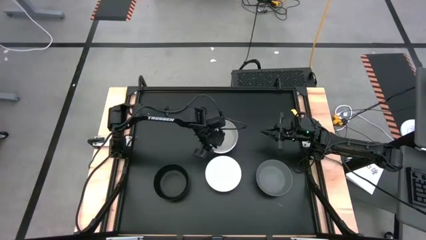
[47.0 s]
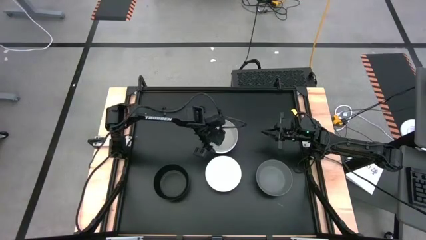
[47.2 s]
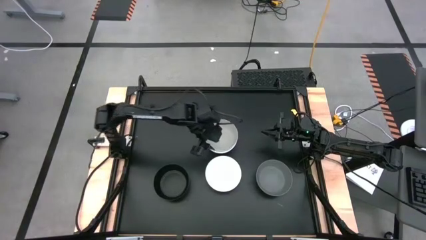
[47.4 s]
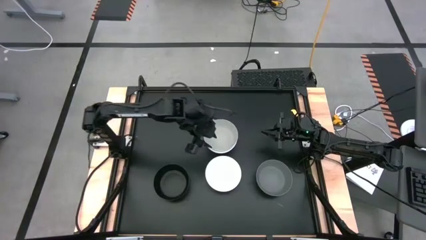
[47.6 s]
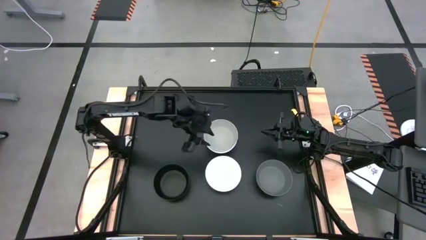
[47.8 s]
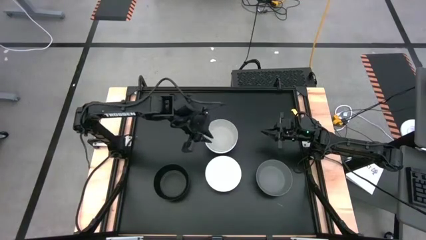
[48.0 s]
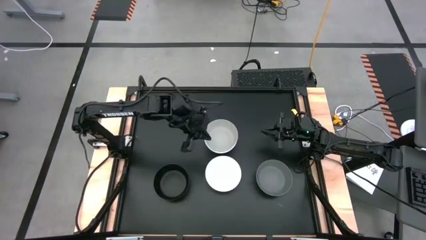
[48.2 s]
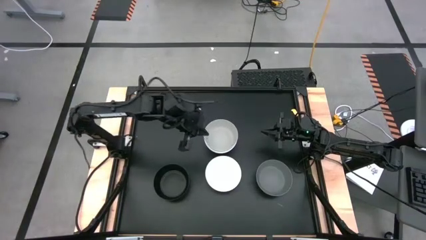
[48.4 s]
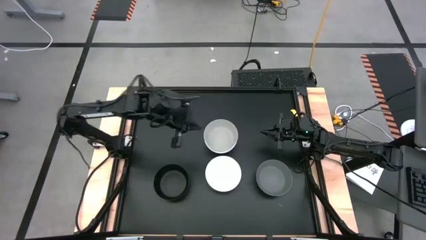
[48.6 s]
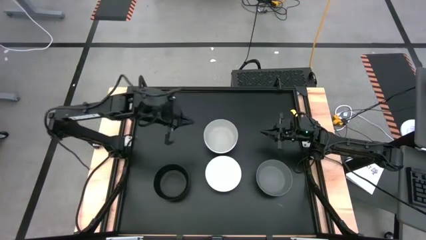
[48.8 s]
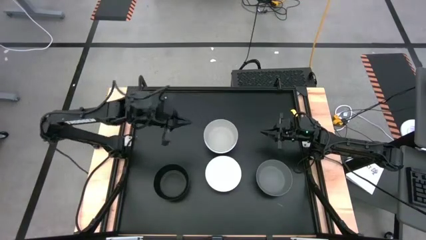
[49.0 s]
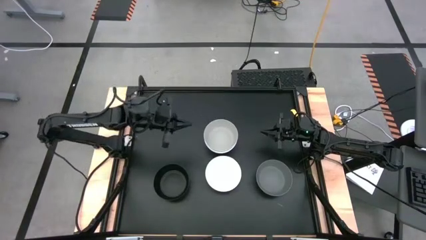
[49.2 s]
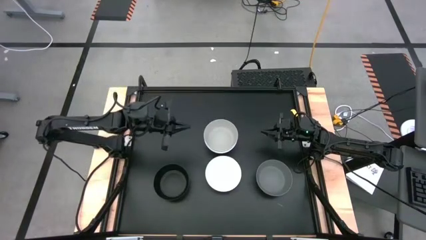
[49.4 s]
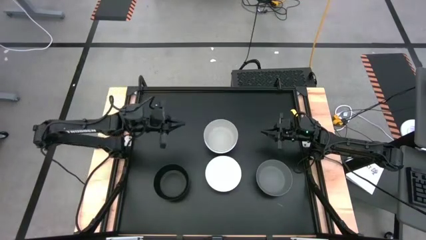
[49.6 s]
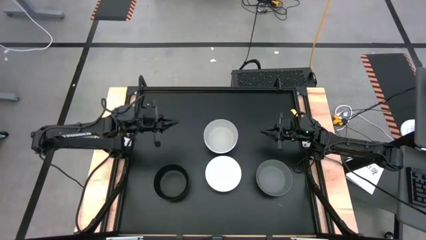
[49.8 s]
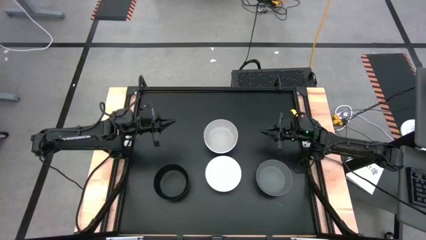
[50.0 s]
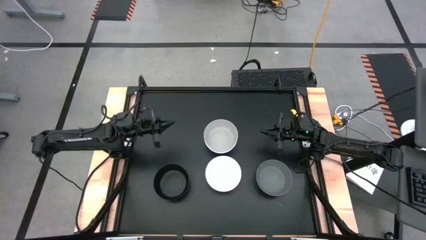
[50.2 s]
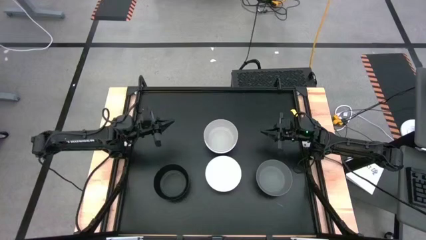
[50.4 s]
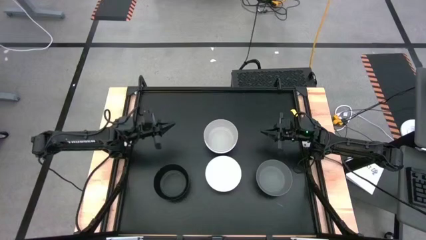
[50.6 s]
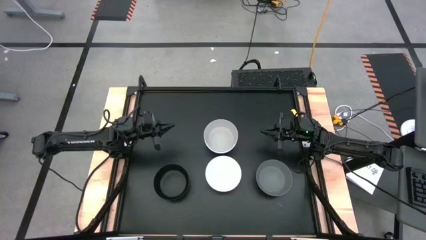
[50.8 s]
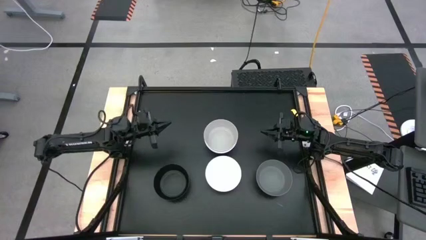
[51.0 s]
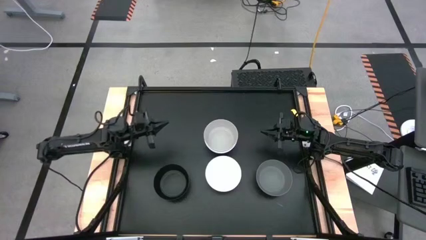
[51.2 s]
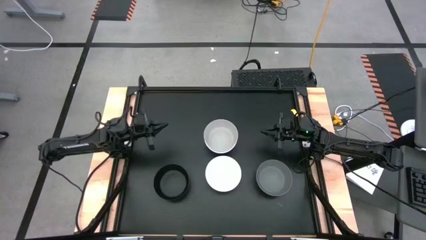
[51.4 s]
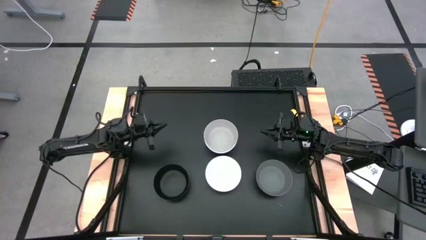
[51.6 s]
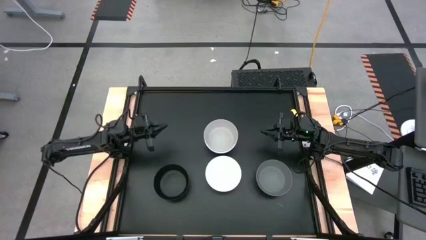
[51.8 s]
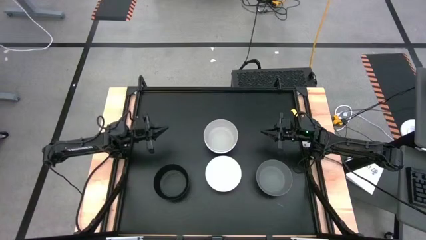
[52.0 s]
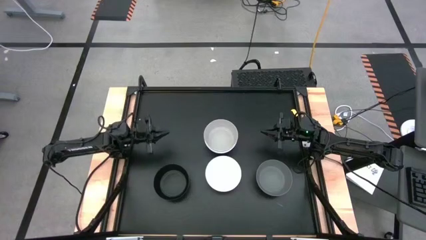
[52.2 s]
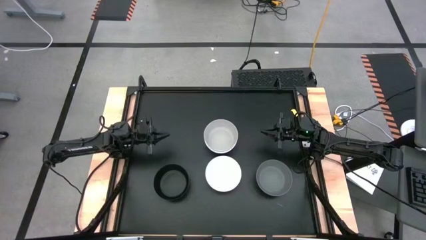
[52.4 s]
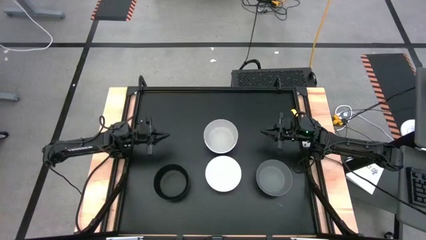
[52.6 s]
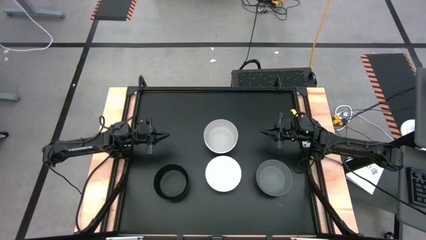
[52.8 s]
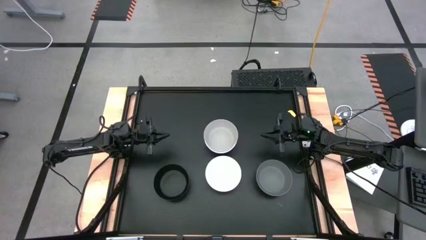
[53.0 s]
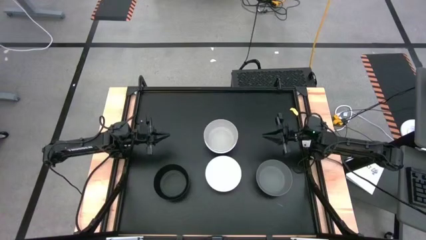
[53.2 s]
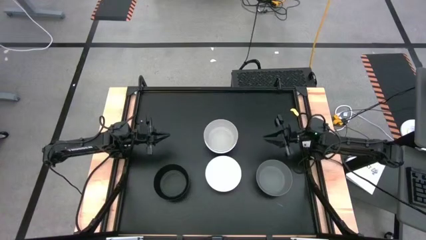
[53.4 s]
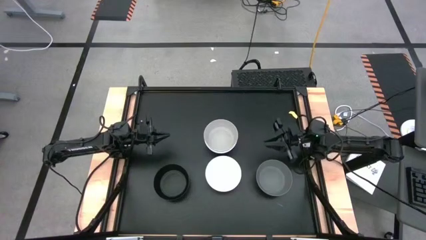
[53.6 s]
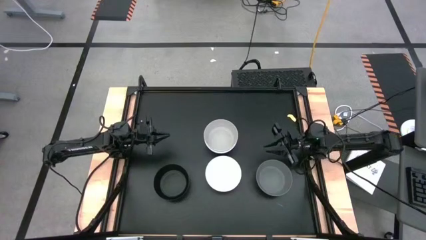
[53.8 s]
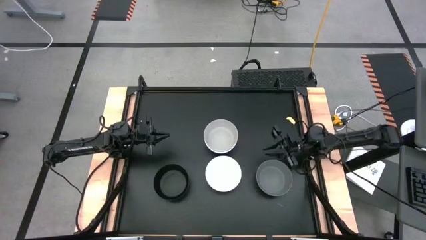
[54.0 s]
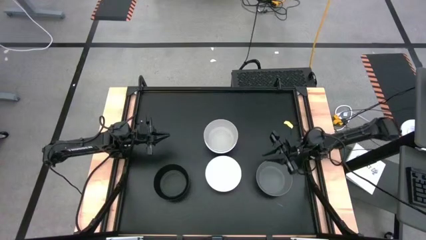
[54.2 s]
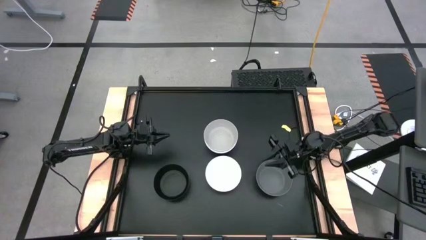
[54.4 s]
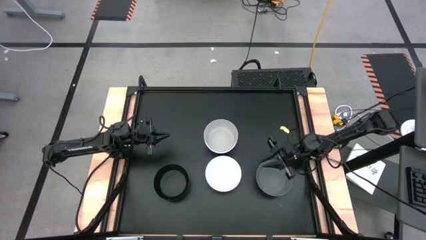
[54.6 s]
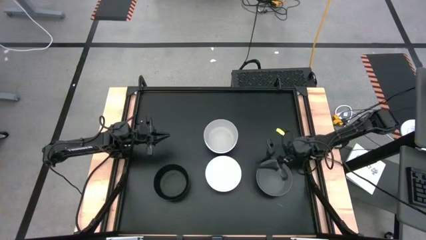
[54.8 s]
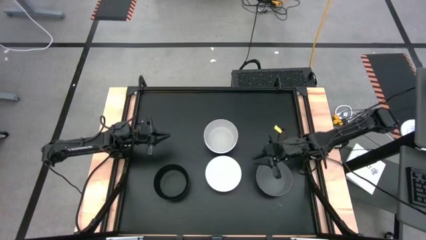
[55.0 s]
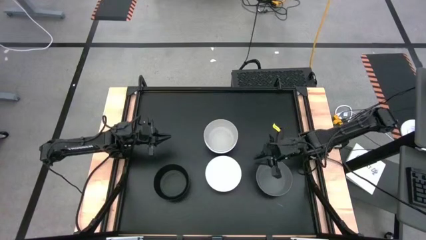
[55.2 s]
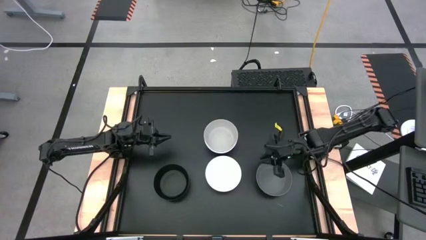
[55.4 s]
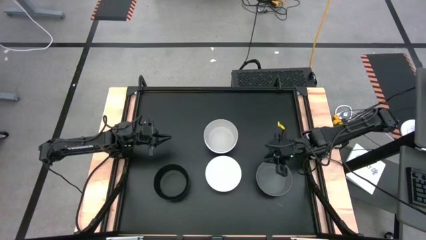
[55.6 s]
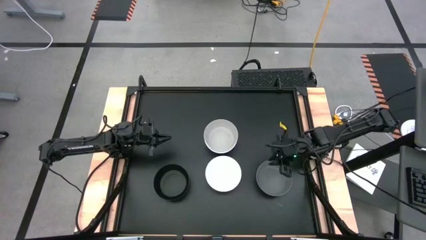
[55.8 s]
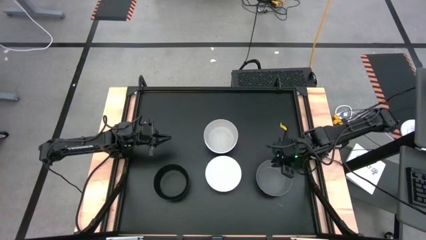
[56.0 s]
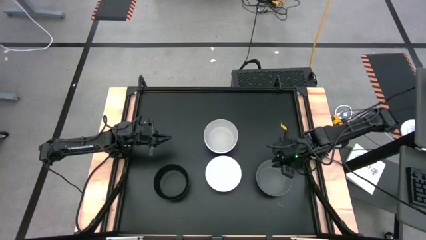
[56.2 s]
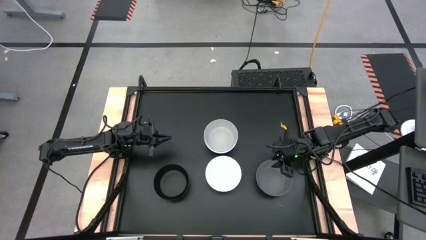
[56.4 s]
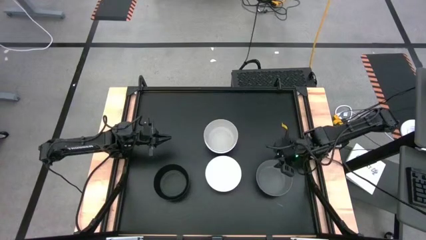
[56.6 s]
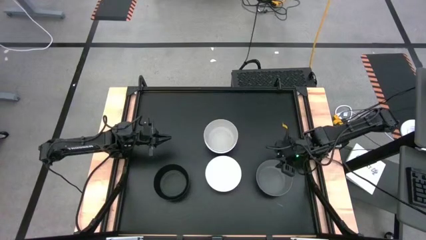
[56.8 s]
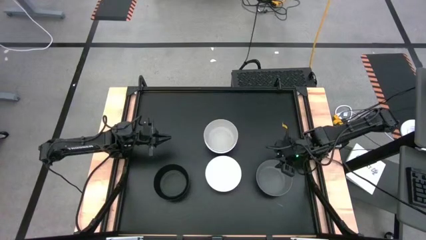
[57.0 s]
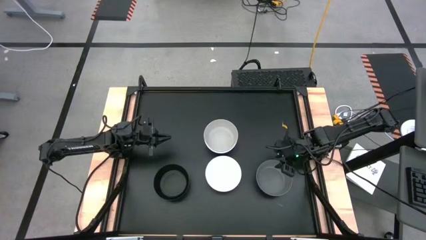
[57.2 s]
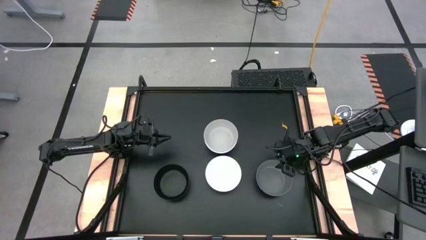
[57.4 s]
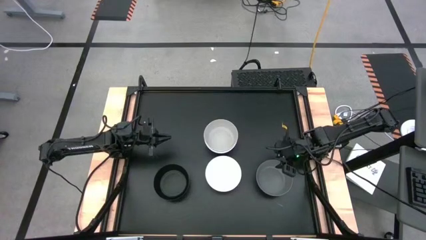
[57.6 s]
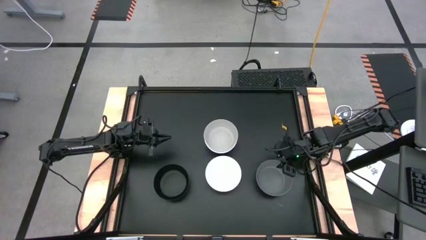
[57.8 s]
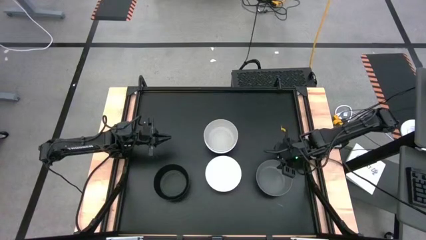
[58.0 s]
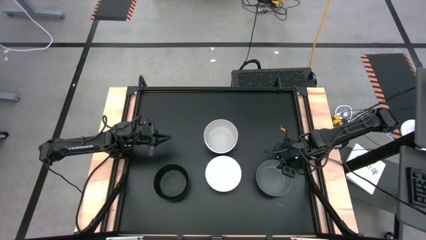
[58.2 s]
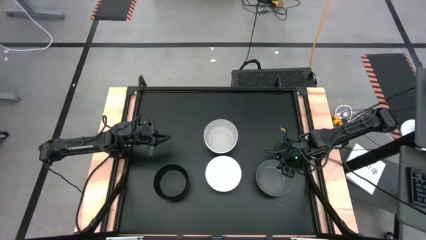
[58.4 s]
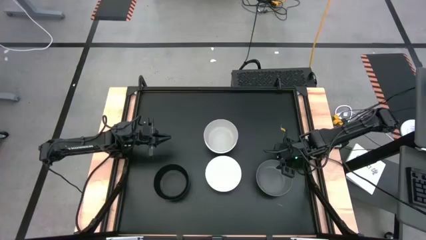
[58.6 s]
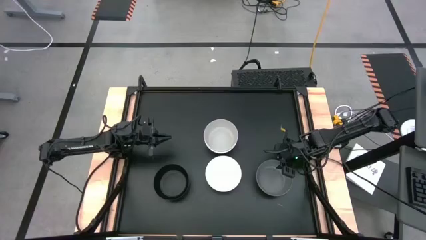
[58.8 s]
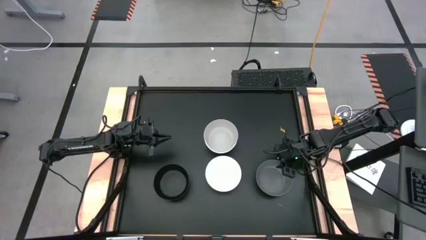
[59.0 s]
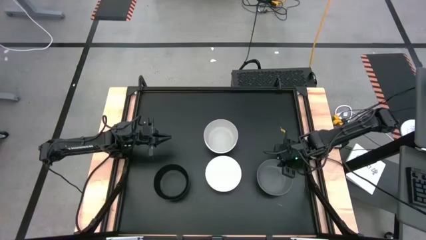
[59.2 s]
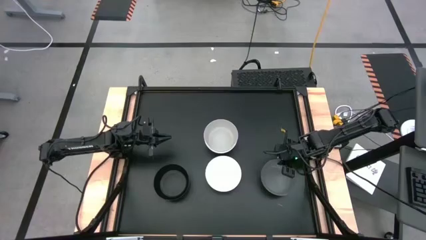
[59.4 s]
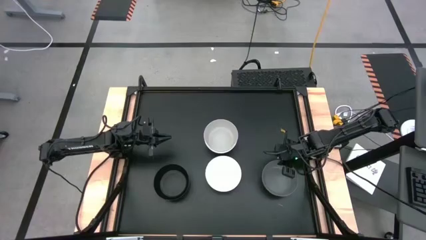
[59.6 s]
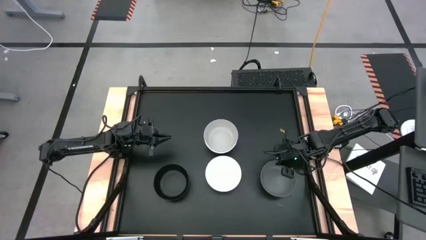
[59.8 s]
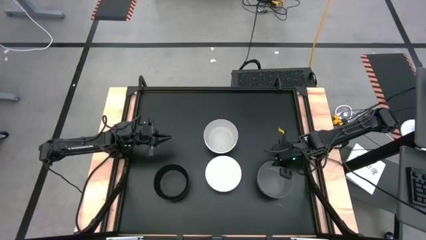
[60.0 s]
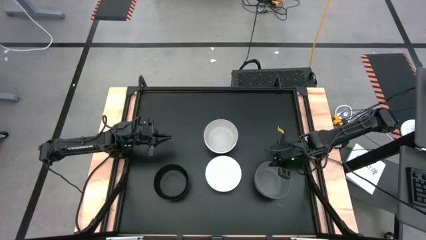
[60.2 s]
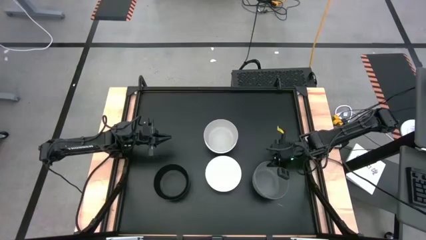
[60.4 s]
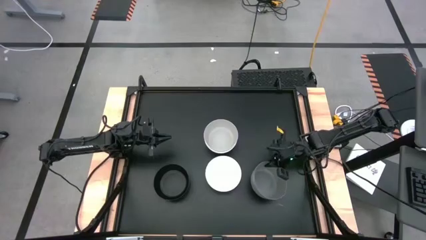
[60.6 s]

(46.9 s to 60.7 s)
Task: Nest bowls inside each other
Stack the dark grey bowl on top of the light grey bowl
